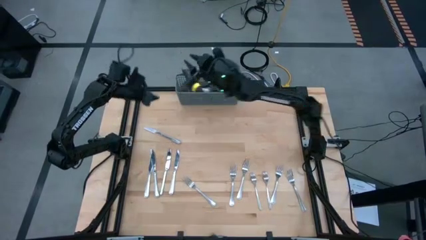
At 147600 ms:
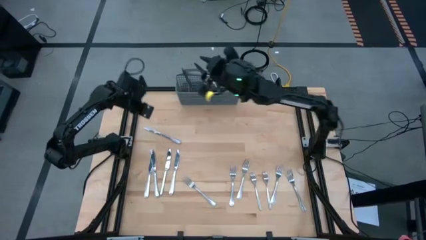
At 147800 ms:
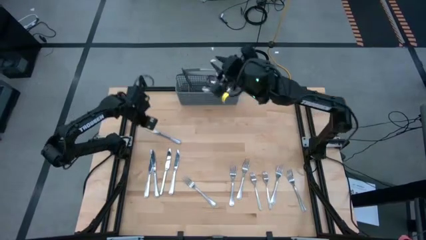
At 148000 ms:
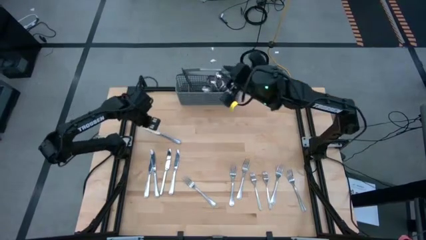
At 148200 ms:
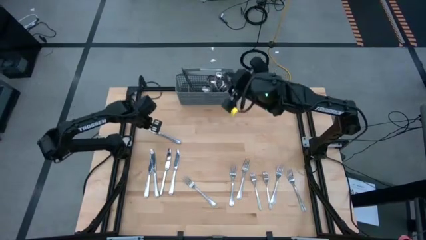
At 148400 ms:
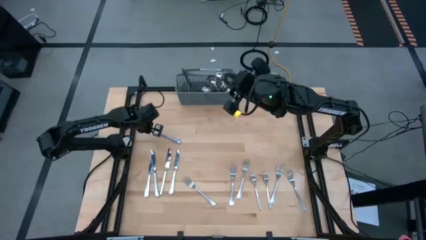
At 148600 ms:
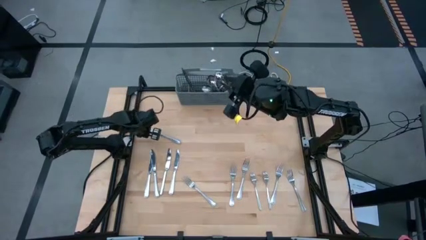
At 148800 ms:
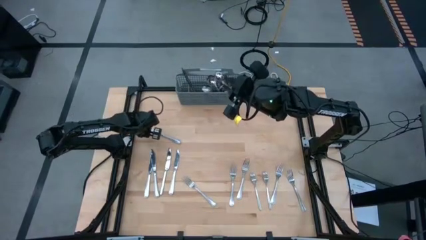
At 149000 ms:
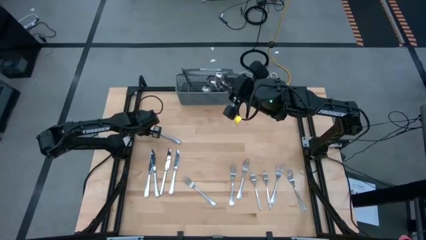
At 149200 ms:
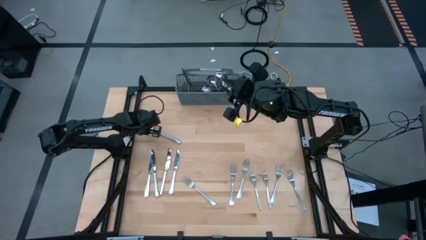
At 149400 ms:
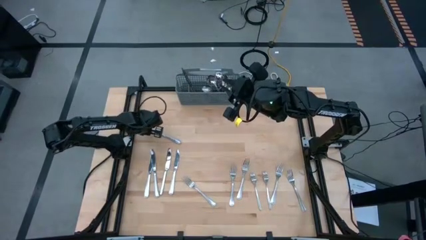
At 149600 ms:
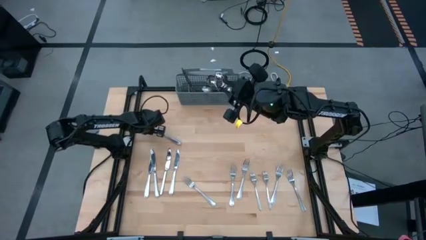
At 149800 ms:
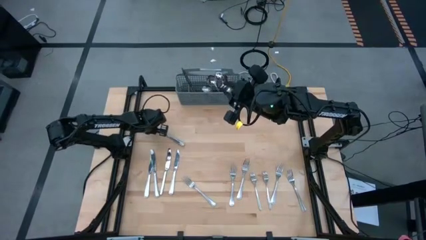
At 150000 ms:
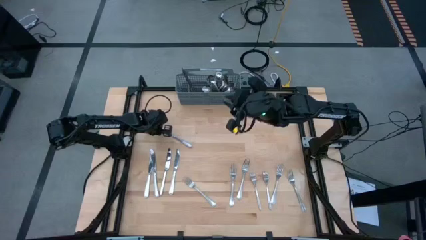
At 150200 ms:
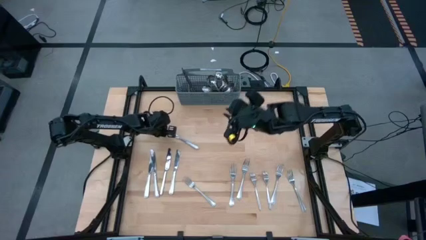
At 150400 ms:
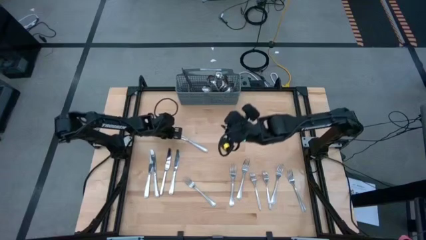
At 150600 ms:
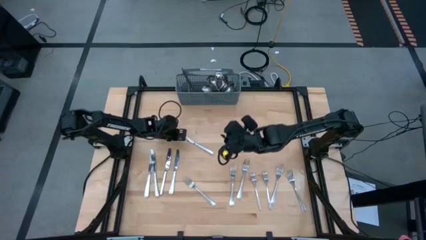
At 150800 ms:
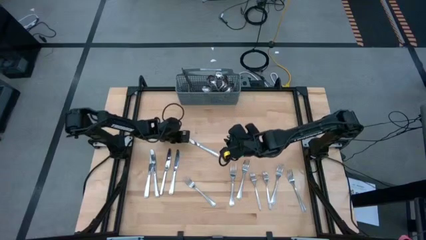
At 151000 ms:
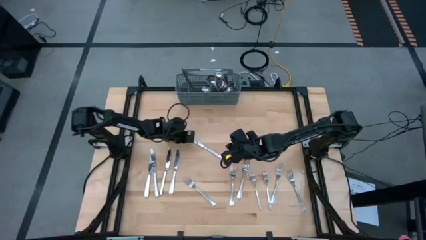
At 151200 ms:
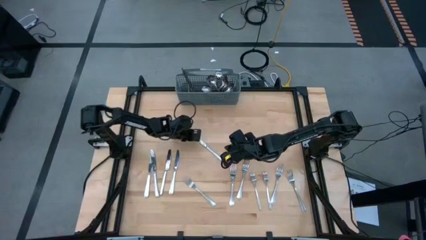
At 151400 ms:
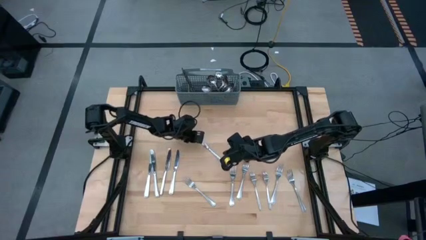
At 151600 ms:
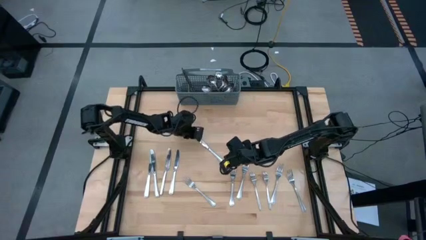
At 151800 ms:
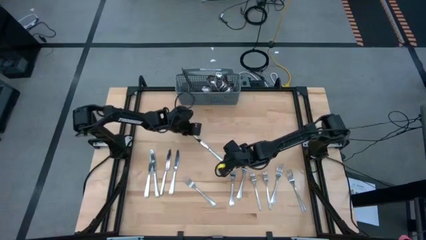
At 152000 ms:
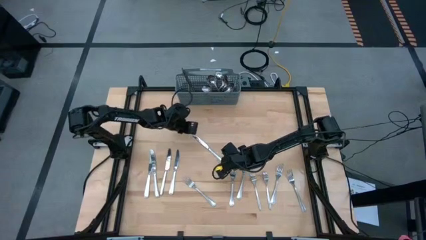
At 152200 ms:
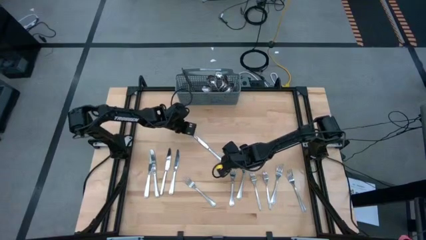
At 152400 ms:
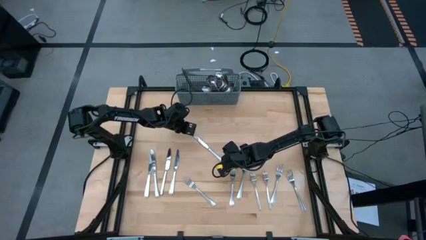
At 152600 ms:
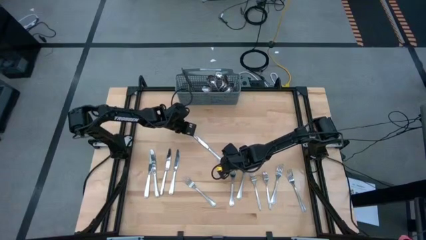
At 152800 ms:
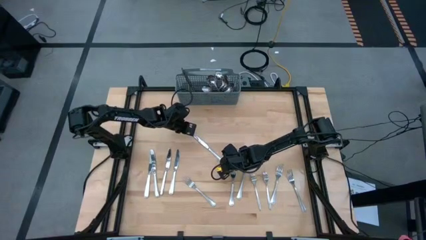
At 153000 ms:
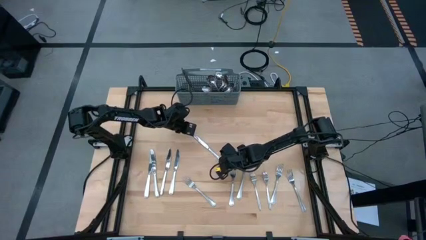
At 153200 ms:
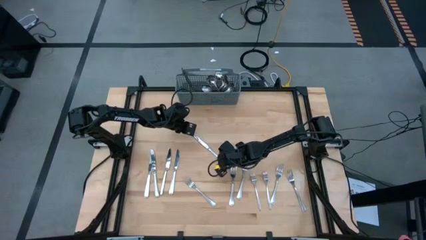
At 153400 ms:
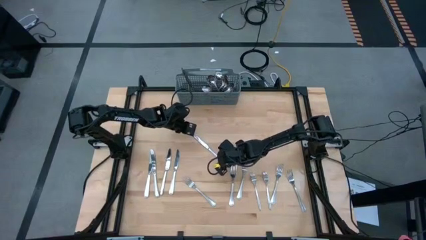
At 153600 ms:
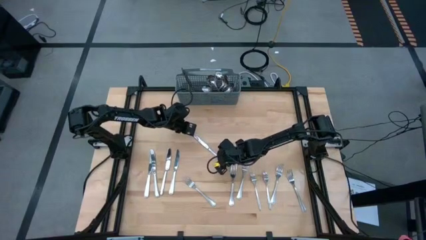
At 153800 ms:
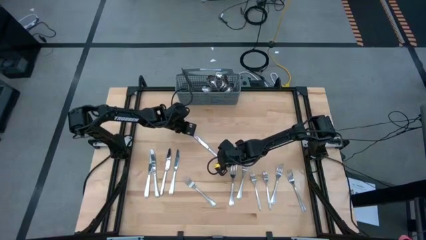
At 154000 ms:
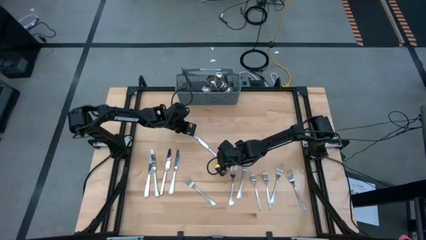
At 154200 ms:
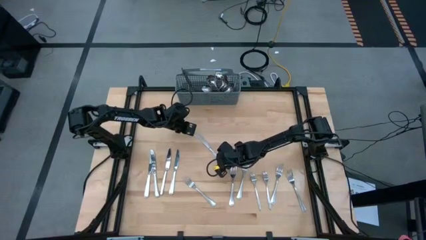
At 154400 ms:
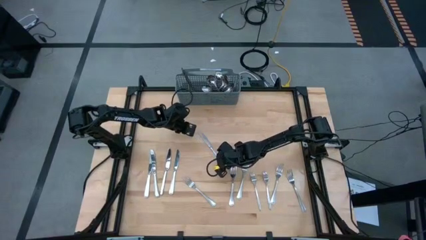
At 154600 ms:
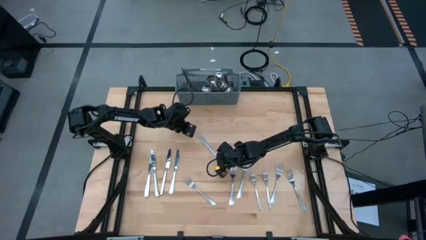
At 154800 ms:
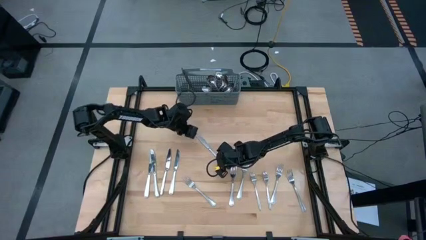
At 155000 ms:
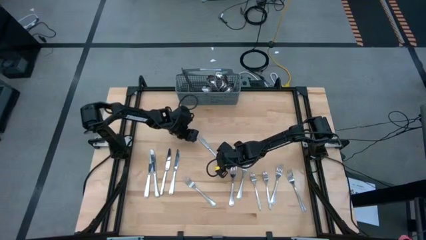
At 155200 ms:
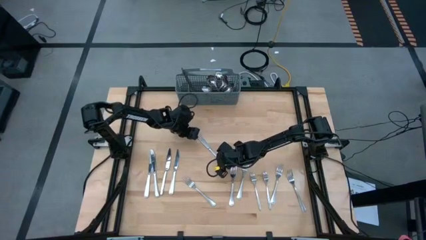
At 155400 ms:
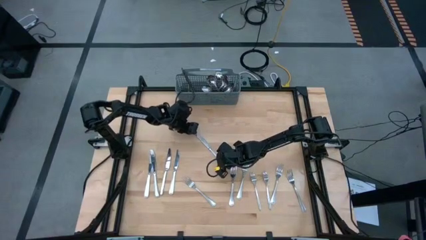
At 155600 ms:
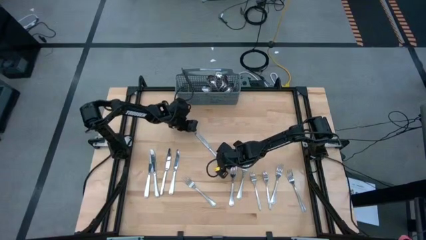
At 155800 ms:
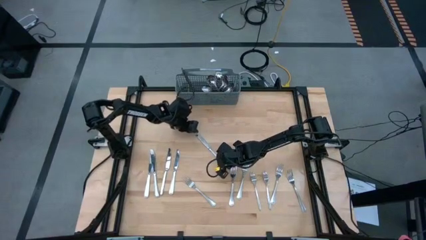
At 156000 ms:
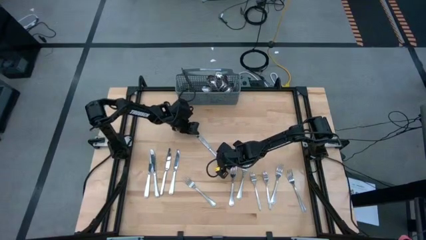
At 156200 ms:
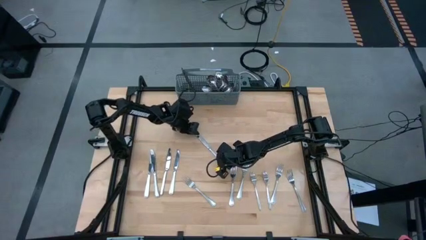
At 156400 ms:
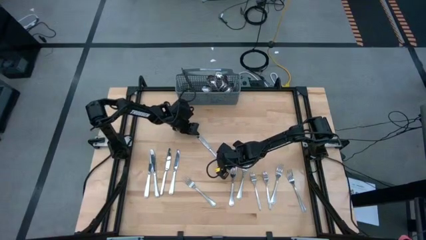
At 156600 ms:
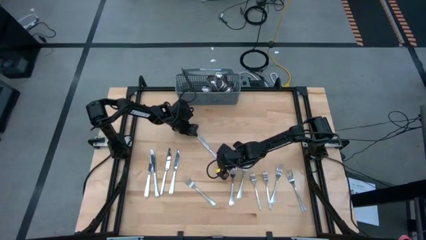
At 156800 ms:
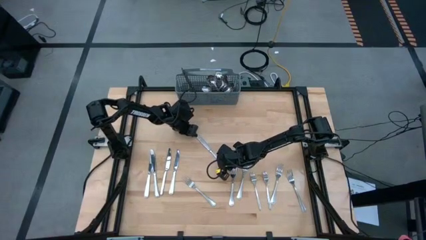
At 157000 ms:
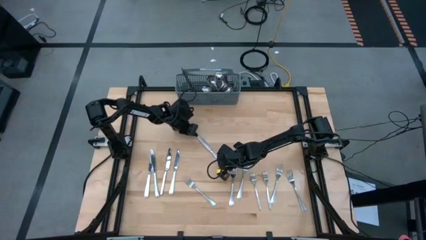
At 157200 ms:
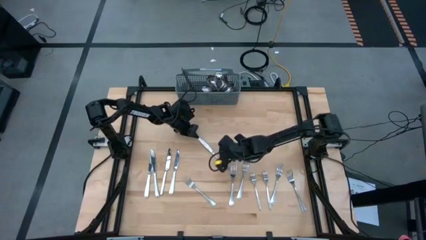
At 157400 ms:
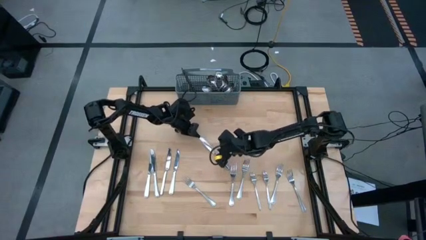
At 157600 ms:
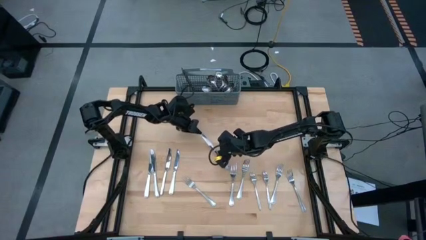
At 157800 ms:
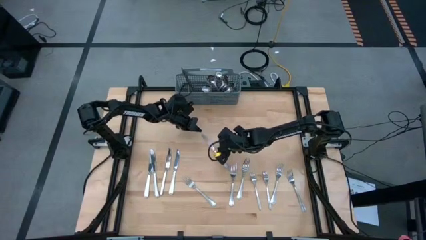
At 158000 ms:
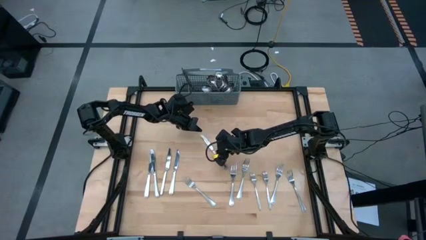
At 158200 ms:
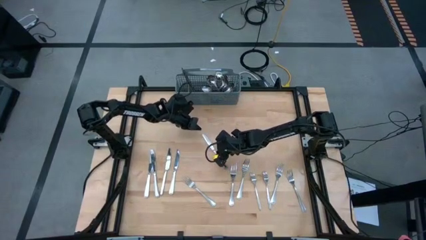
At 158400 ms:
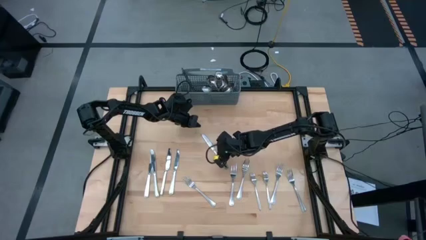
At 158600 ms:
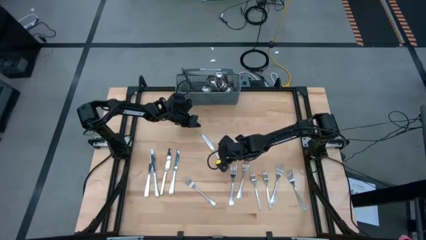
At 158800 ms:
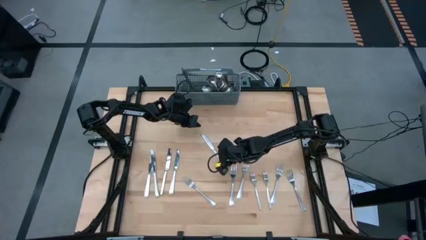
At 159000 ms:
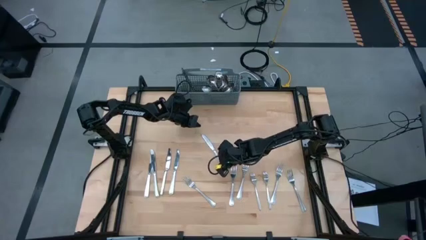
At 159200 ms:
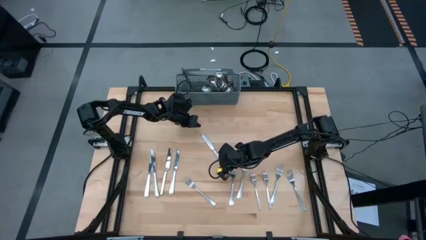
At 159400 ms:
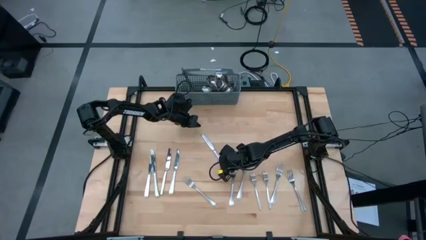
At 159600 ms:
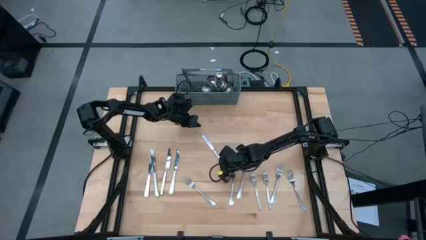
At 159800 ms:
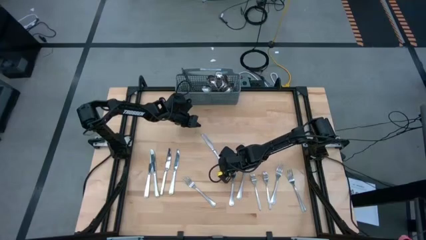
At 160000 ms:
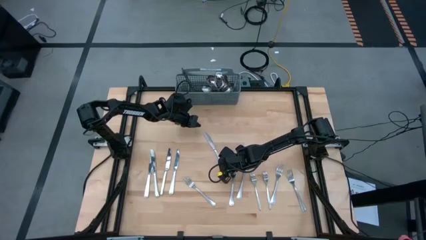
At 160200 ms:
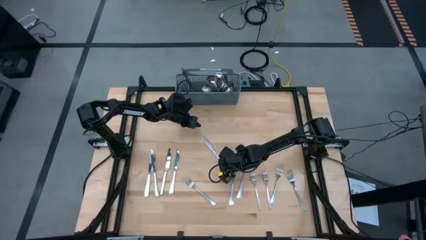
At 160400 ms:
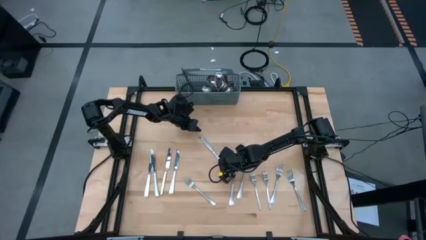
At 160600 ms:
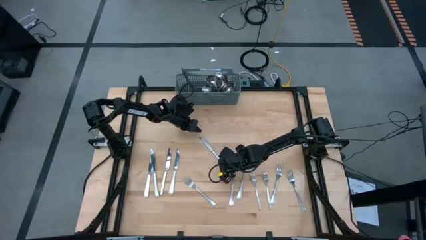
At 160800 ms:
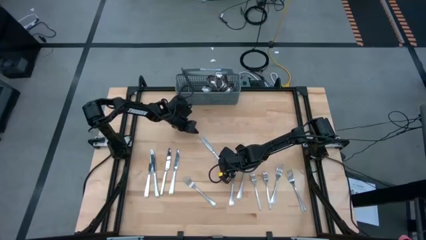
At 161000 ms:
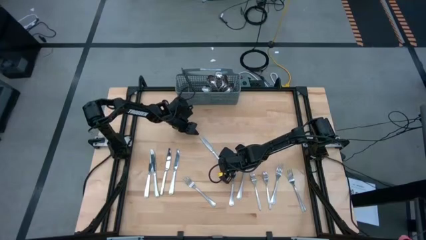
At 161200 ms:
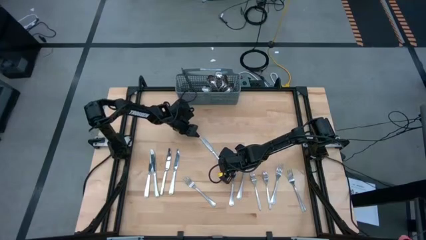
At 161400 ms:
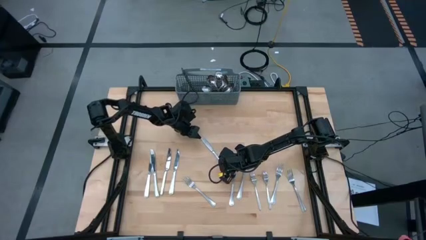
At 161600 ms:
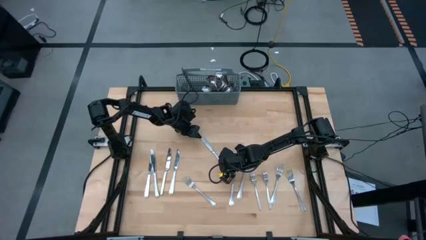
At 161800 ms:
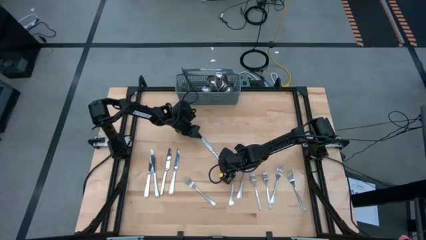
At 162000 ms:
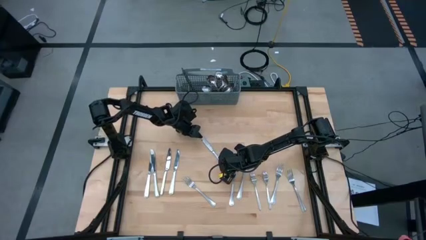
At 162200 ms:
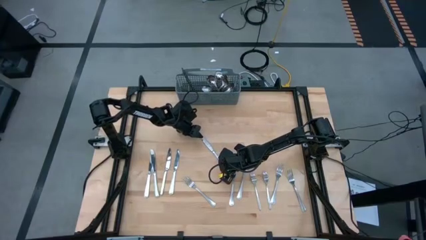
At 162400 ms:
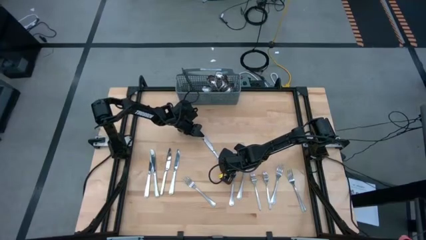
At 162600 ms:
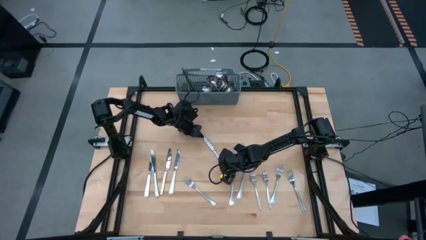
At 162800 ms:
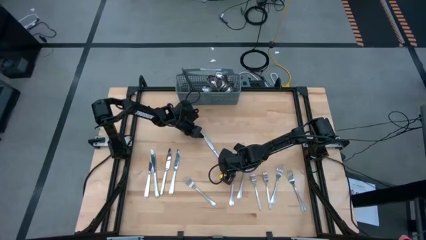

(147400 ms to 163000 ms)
Task: Sort silverware
Put the silver knife into the gray utensil holder

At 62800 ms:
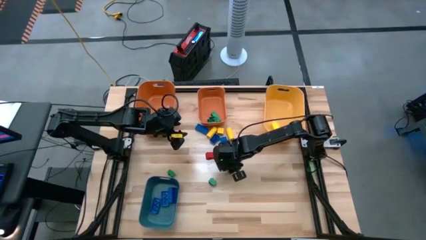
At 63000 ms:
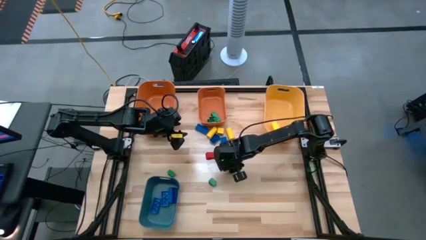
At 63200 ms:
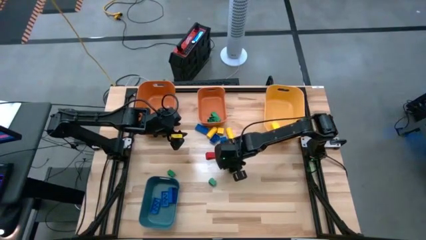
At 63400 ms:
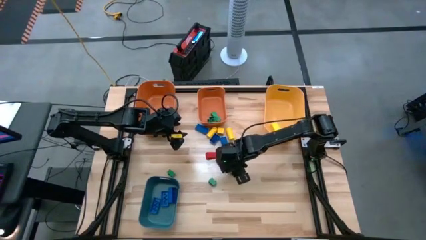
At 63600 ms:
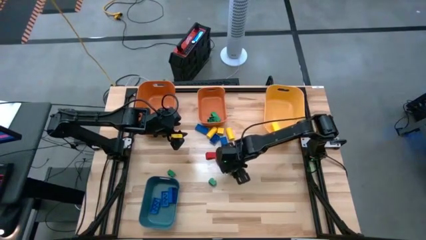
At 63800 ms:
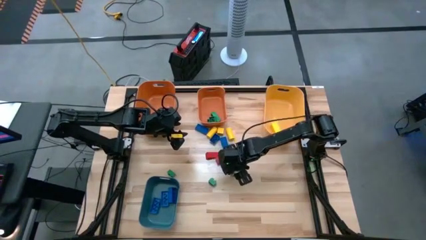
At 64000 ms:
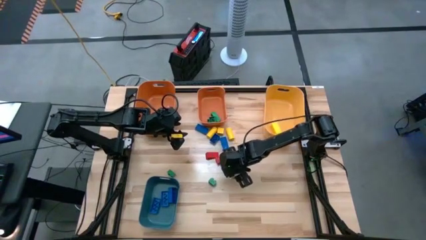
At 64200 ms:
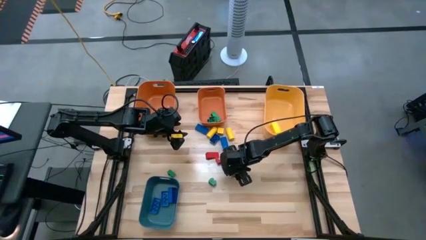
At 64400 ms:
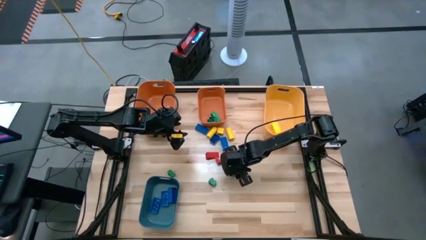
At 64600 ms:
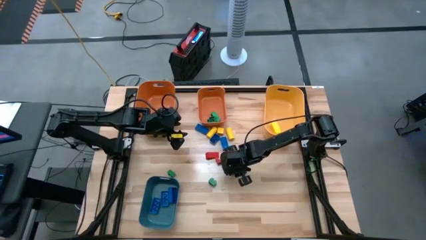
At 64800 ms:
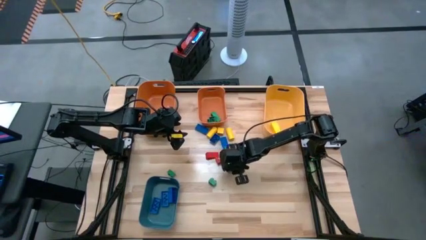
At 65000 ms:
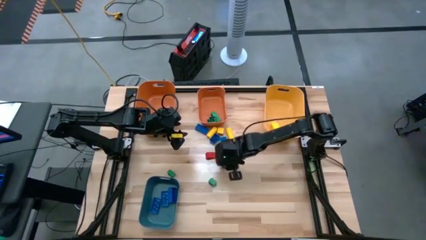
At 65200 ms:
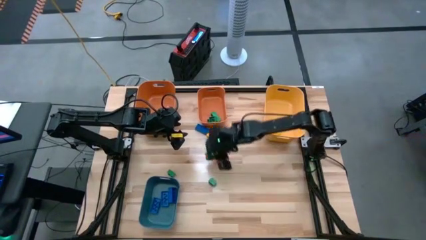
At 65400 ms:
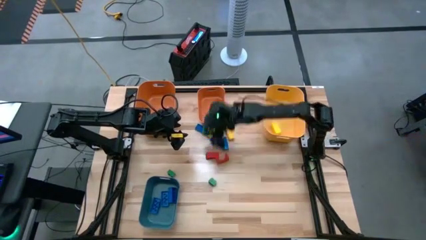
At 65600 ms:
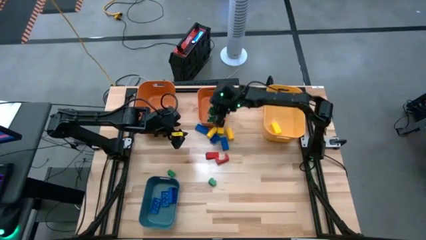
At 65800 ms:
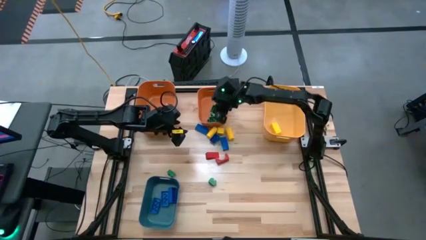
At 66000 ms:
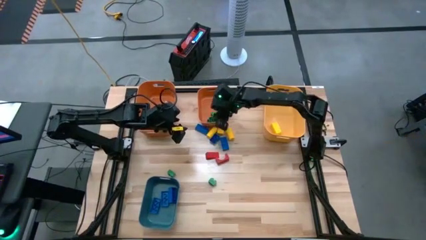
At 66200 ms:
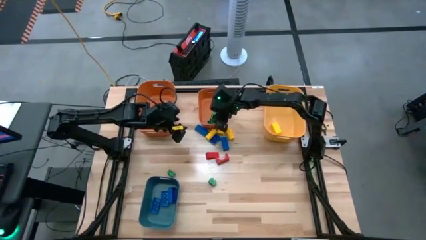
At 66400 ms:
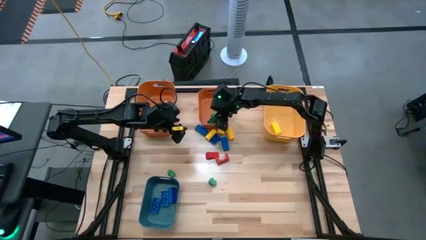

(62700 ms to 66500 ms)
Task: Sort blocks
Put the green game piece into the right orange bin
